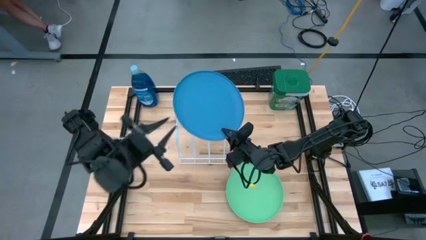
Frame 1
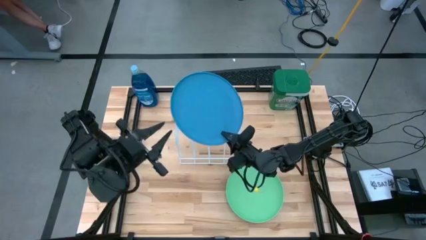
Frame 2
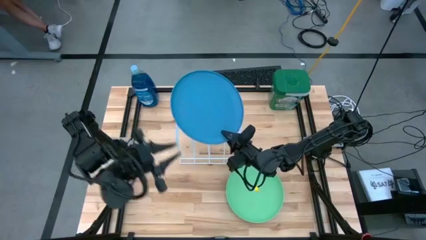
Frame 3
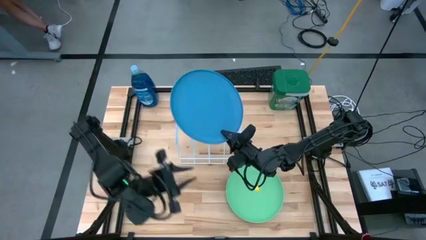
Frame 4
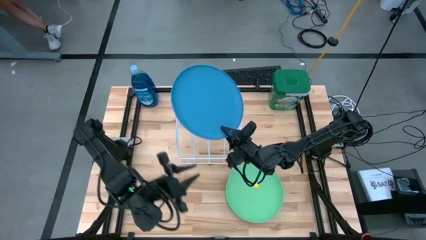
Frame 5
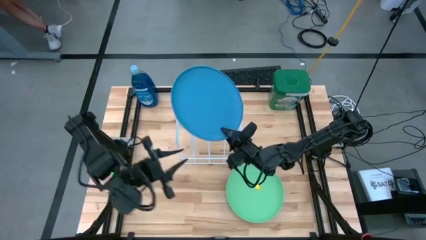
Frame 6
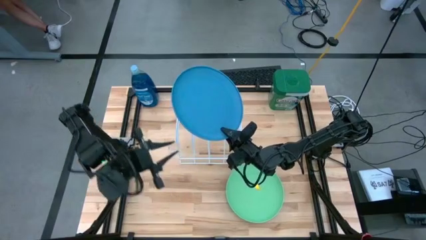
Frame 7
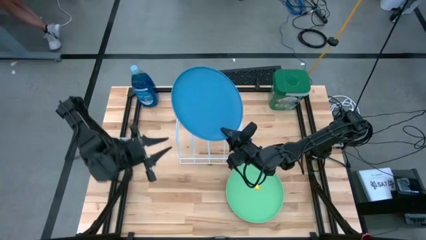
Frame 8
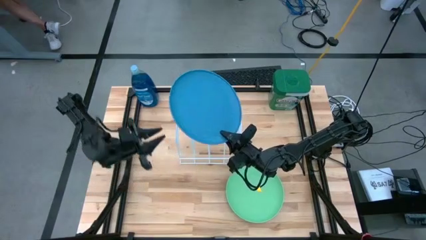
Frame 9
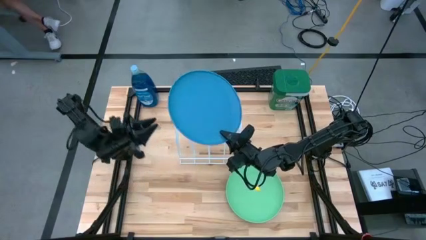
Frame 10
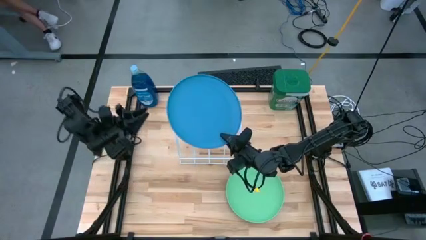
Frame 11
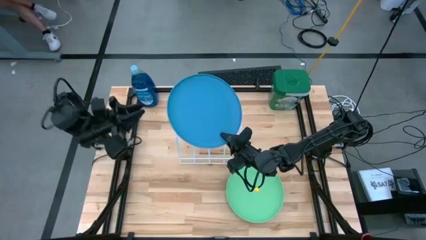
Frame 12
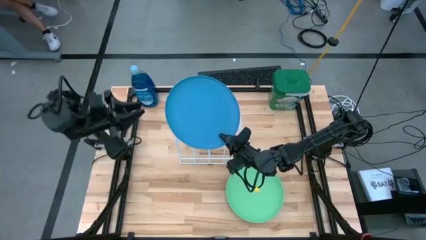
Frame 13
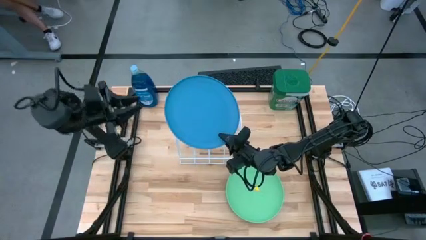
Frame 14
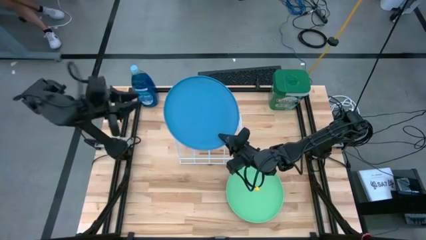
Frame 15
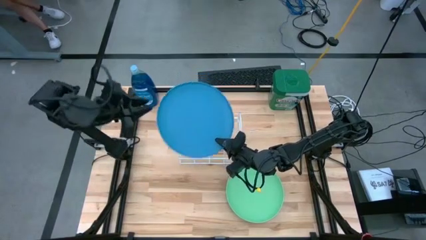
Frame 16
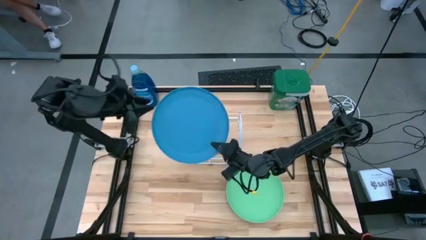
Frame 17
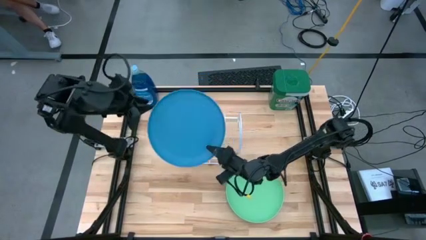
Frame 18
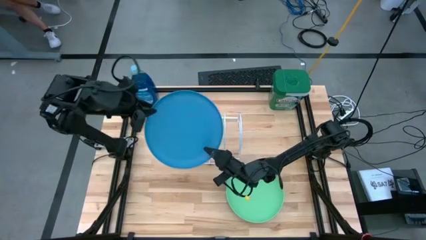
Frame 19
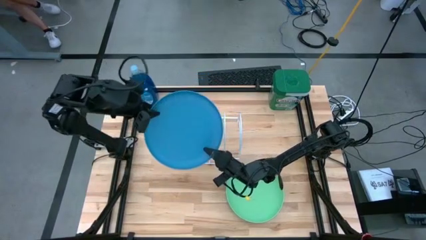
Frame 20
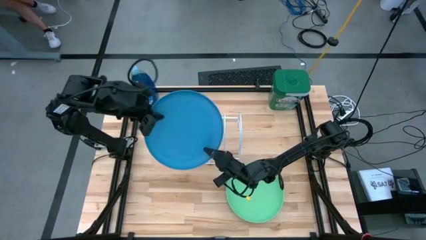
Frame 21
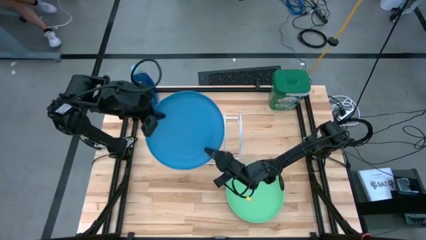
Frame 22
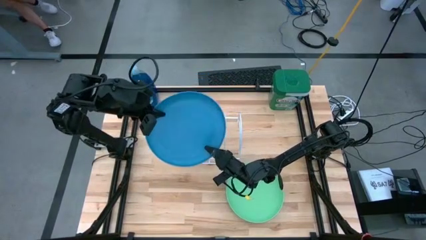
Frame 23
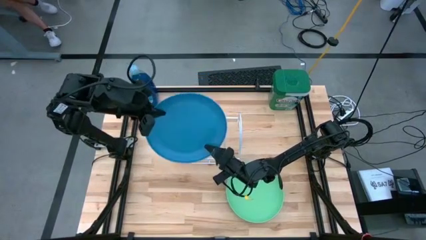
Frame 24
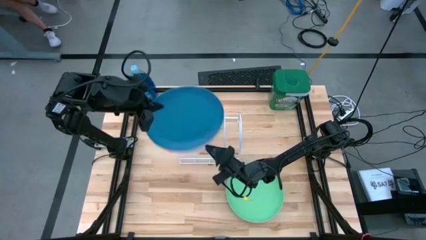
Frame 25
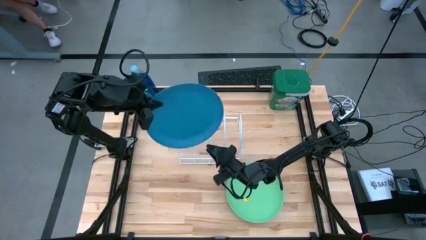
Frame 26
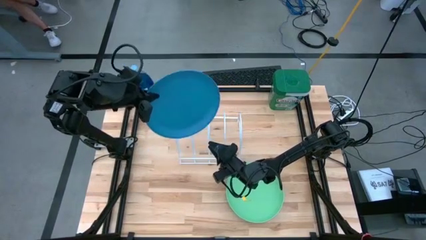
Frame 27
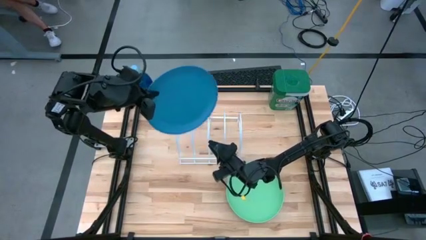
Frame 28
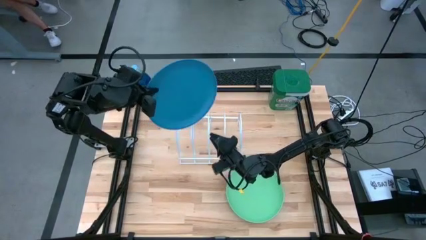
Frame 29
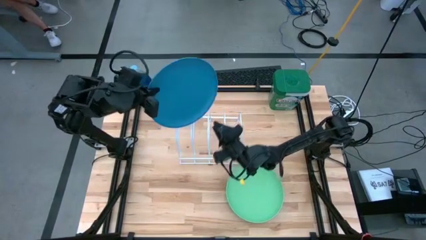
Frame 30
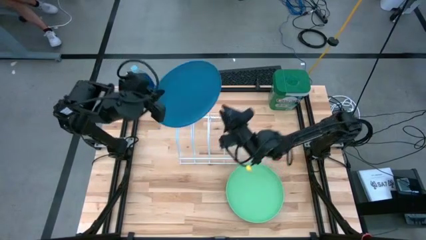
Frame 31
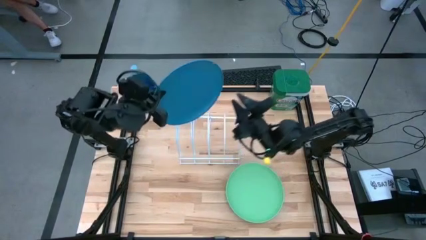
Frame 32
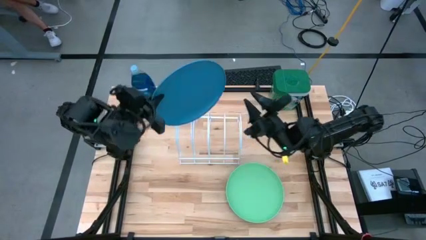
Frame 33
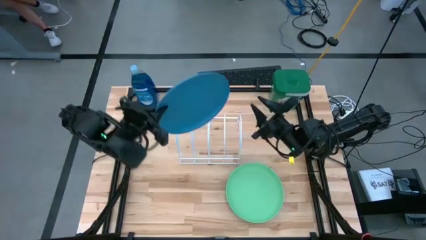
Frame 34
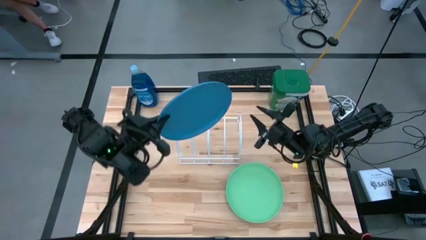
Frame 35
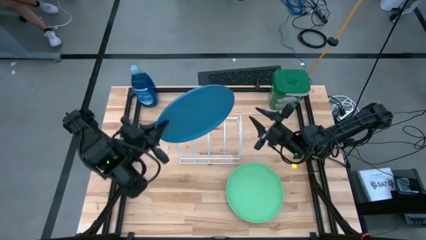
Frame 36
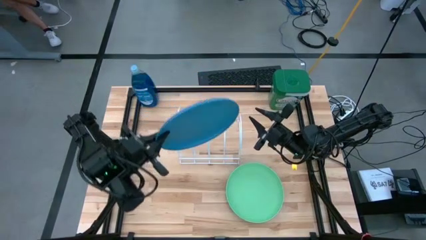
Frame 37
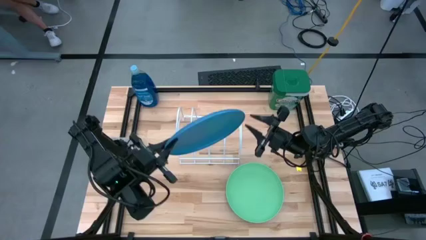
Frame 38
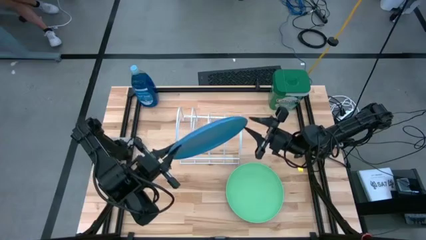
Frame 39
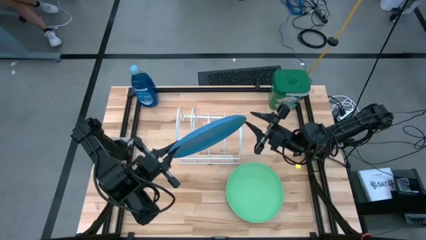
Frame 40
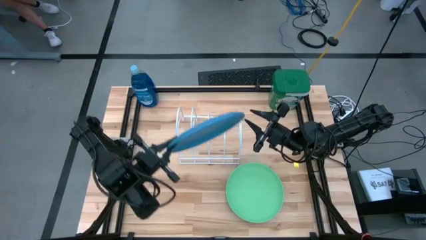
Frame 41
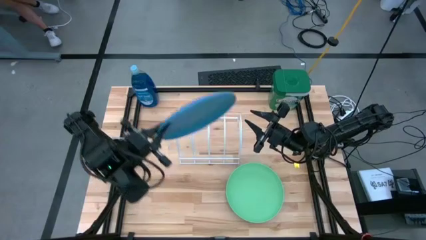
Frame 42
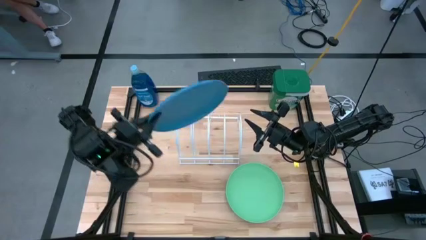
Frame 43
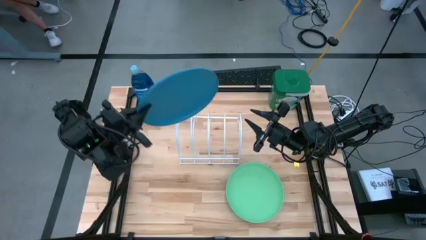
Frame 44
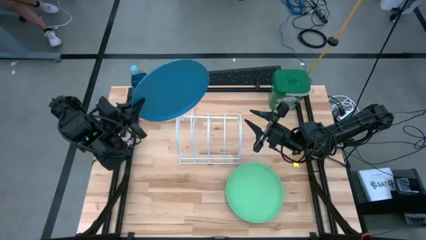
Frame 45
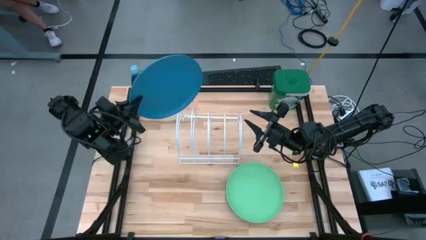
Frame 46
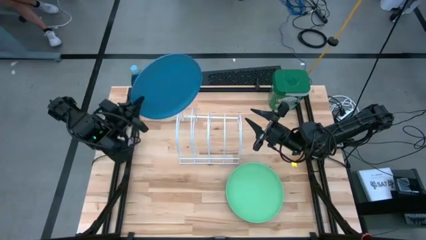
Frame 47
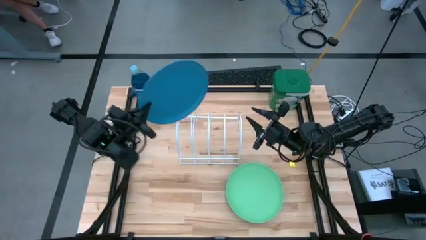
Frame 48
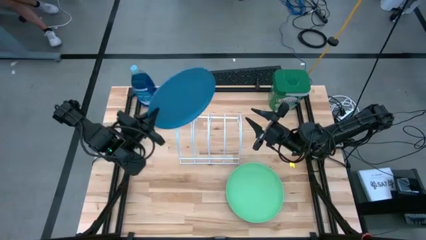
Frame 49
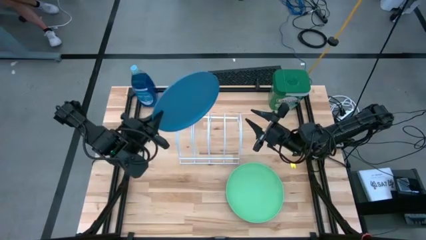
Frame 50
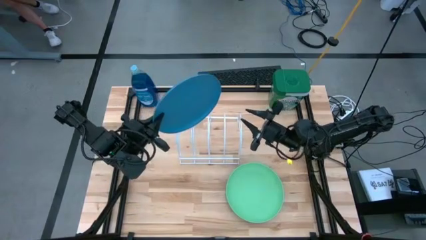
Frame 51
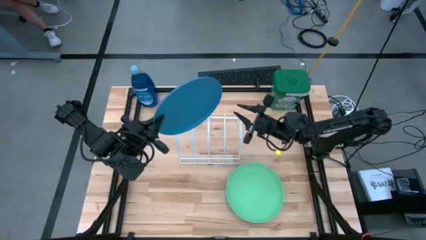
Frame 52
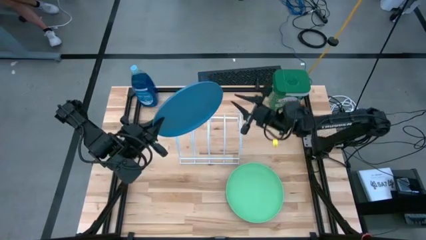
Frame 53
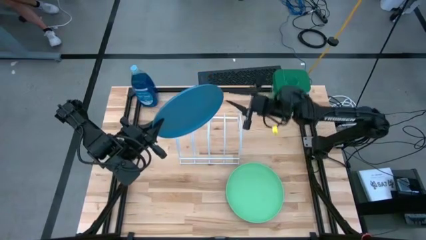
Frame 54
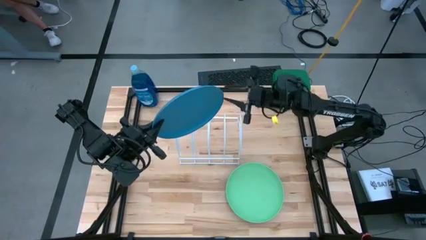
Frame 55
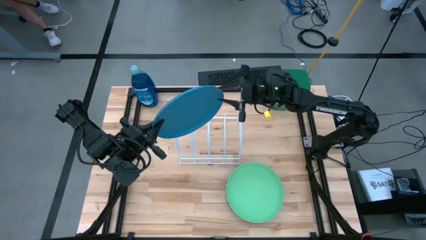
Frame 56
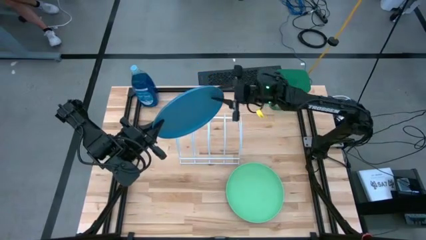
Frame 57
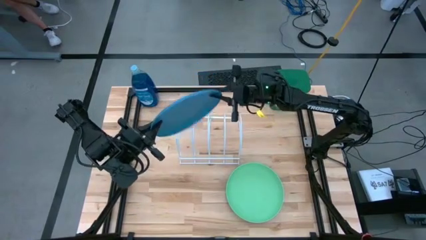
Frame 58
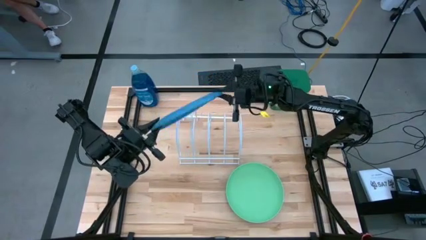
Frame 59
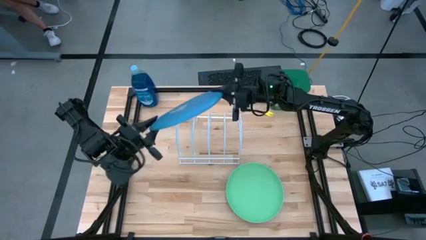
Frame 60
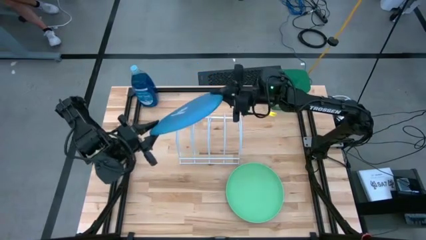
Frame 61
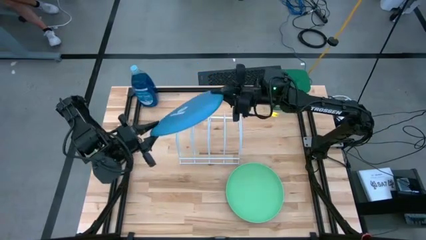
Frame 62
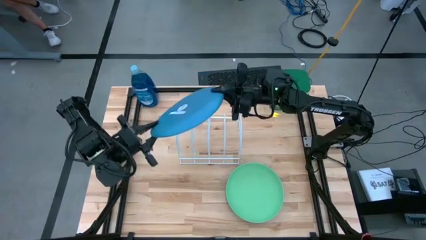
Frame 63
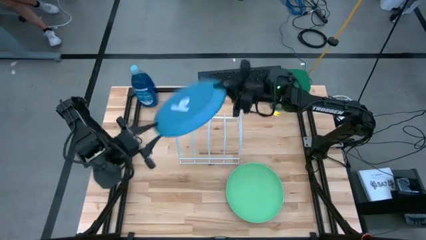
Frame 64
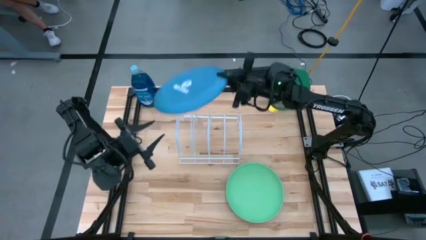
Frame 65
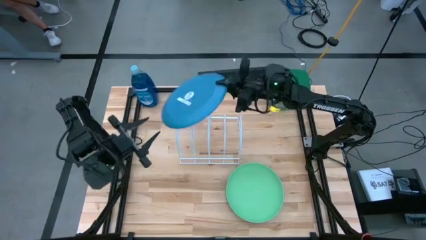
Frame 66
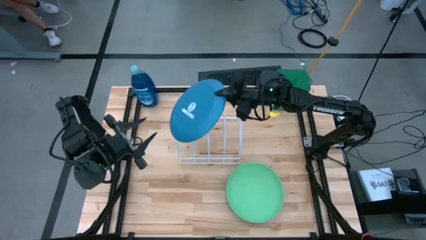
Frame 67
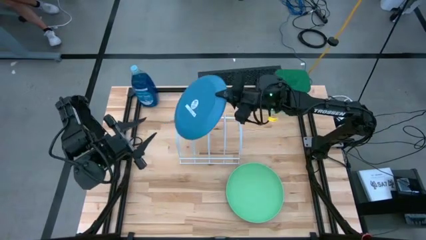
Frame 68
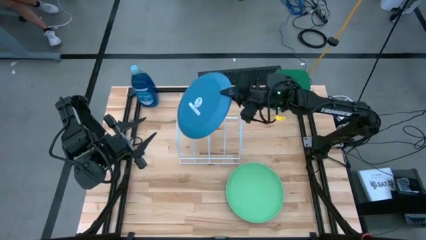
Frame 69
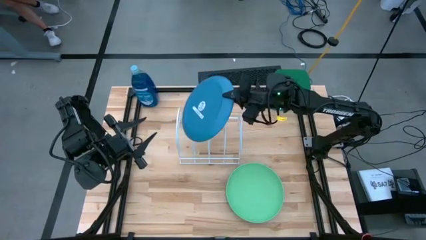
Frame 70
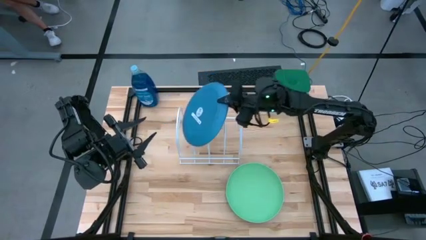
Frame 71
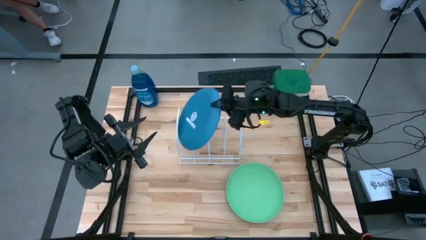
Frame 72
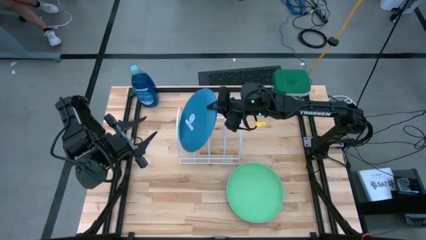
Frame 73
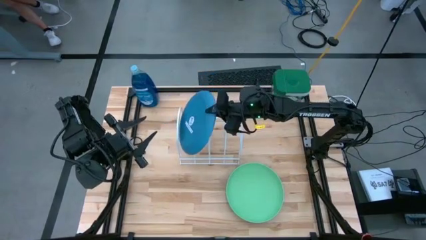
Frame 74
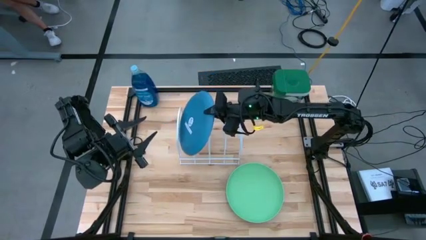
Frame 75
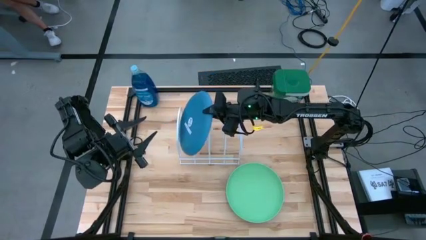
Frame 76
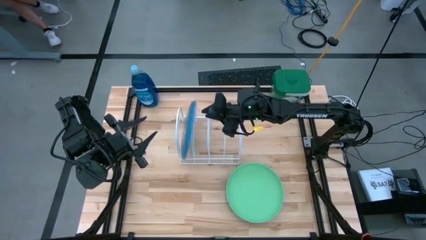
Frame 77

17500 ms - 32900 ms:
Task: Sort dishes
Put the blue plate in the dish rack
